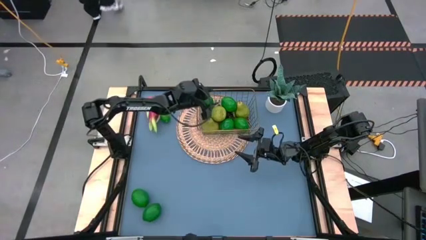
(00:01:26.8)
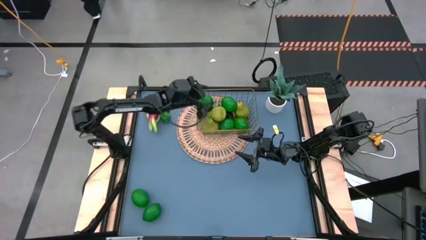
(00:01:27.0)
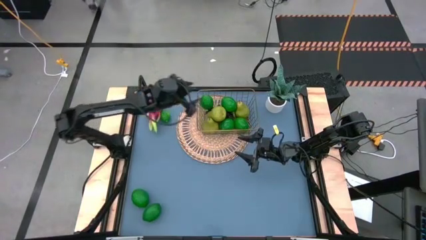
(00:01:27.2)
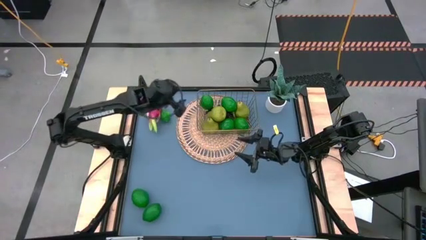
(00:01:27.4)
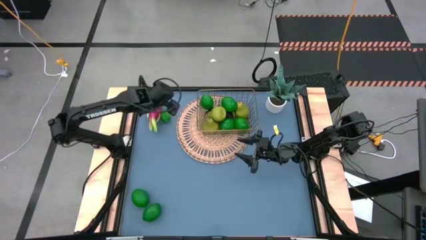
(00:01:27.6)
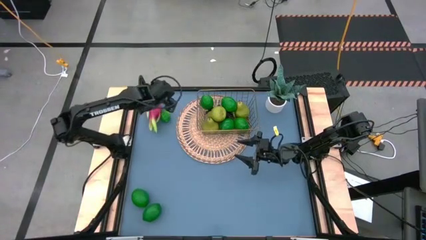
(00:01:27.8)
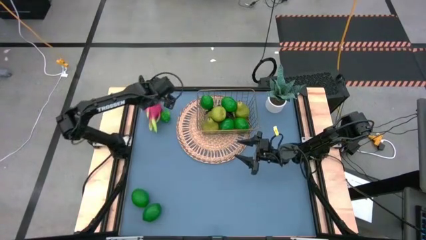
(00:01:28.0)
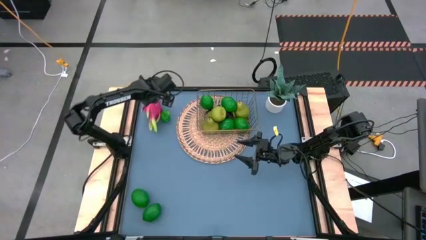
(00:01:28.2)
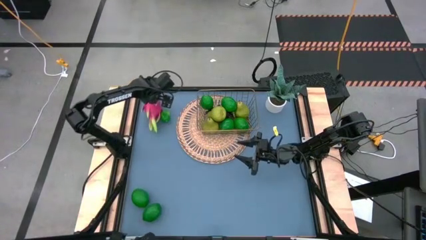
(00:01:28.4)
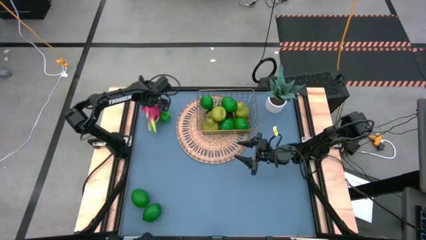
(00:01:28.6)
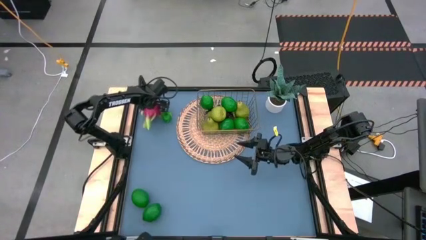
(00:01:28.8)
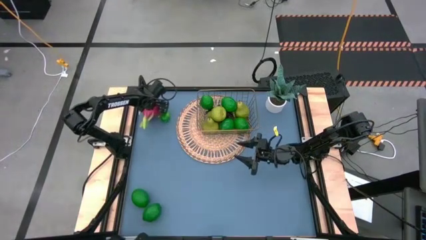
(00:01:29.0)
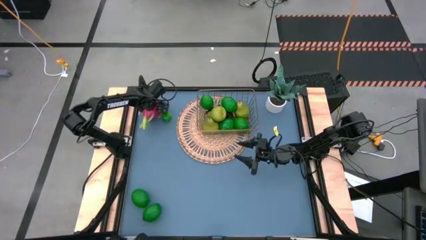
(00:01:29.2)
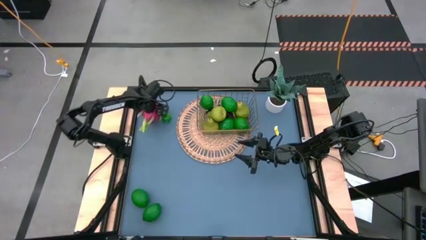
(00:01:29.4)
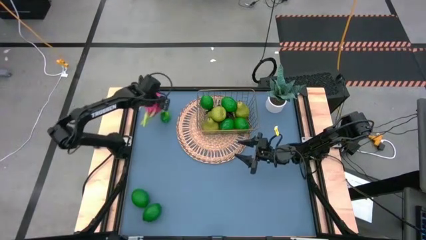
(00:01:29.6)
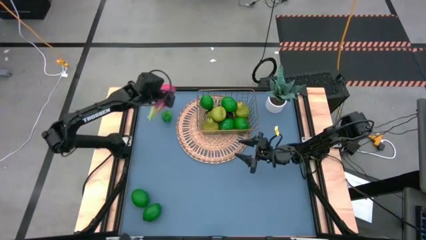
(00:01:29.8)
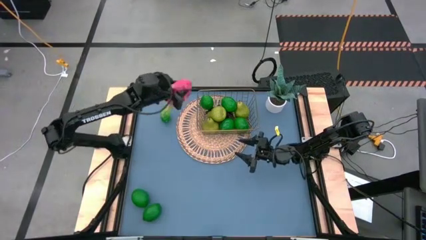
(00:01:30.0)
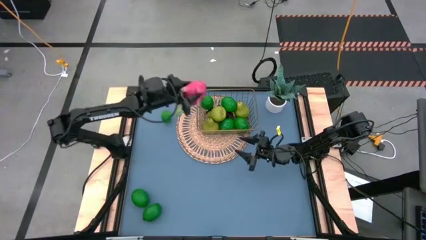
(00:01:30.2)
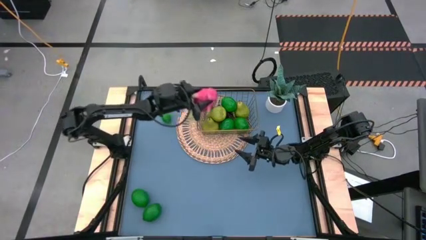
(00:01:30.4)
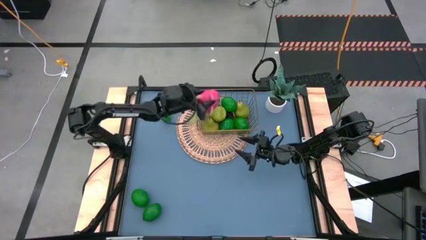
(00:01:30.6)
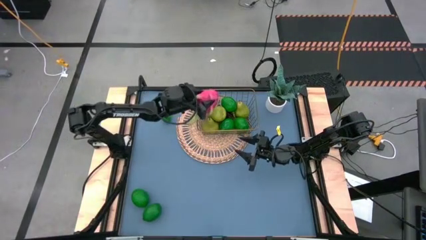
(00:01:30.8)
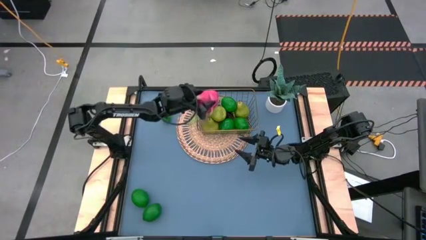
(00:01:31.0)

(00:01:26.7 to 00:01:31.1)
Task: Build produce basket
Put the pink dragon fruit into the wire basket

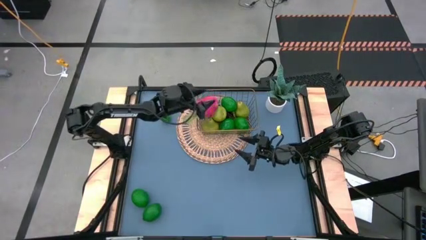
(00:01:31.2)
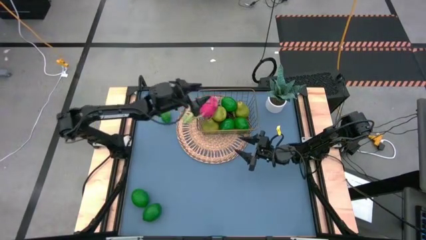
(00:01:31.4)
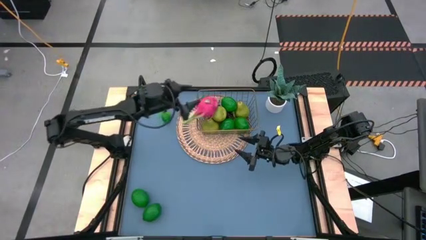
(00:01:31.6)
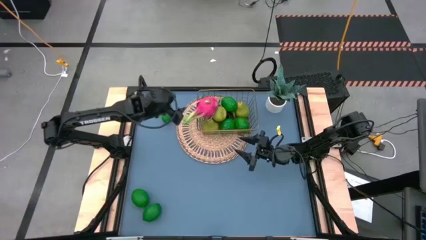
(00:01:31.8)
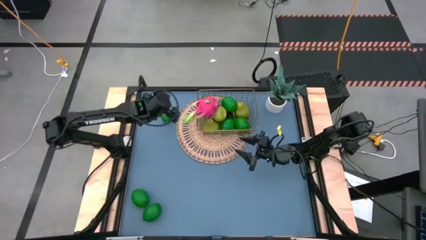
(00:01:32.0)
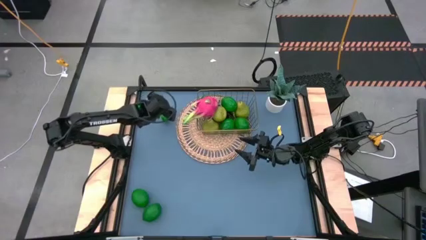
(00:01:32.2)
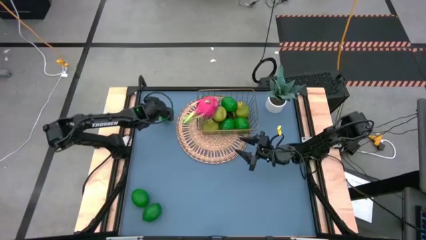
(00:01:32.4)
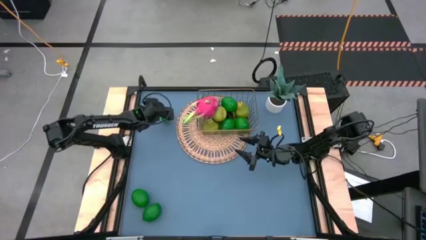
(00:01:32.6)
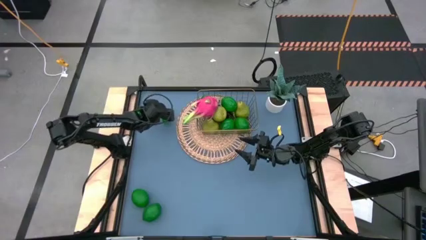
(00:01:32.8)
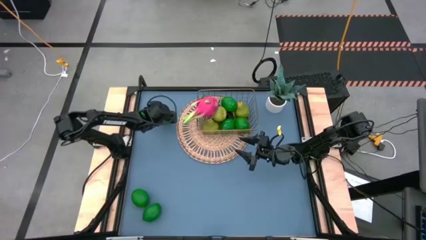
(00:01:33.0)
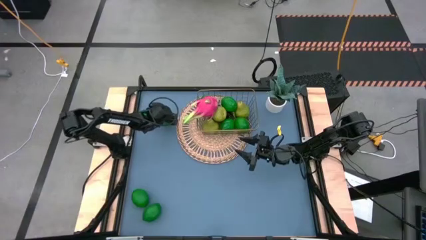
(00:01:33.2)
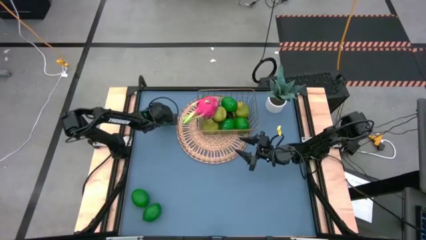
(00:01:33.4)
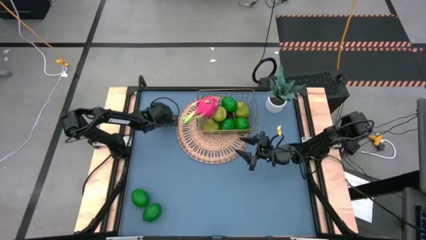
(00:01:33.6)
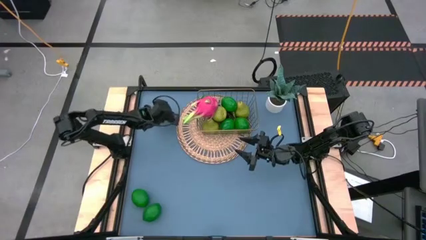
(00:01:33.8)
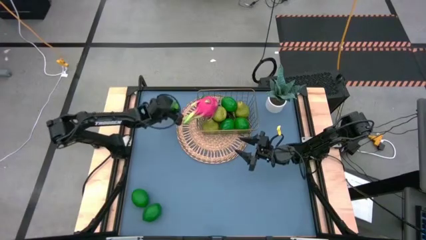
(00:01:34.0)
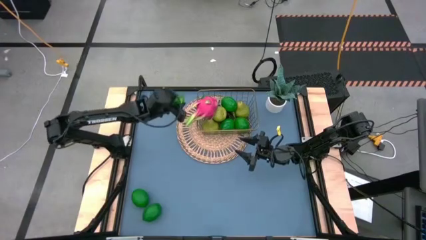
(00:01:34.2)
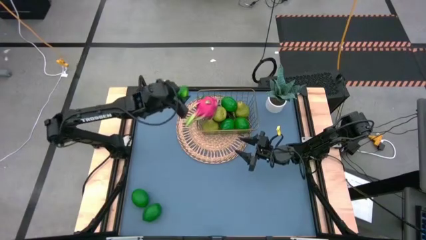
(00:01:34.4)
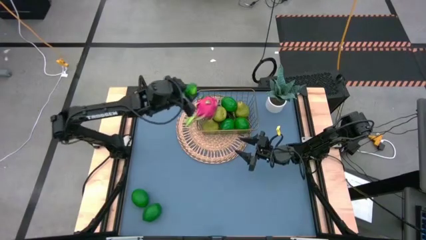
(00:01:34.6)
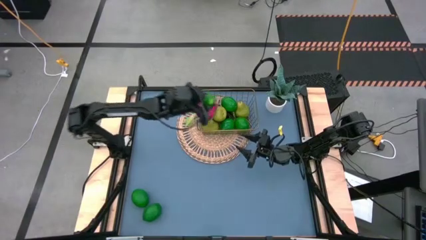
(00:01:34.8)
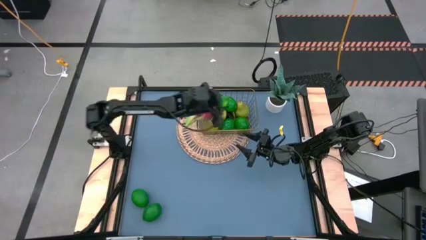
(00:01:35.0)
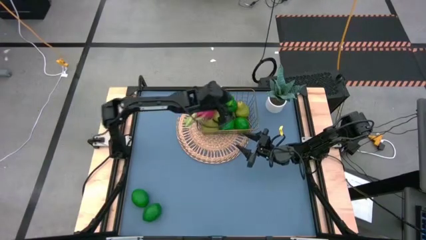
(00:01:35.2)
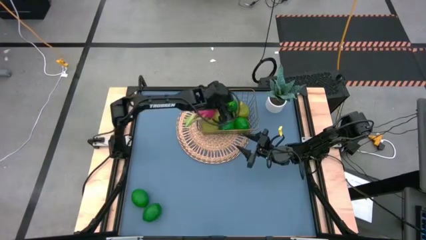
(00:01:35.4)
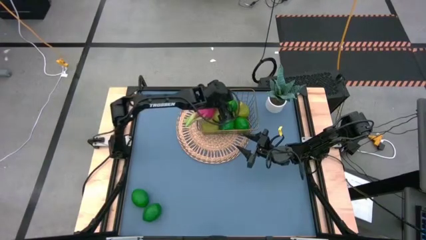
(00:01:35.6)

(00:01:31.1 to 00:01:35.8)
Put the green lime into the wire basket

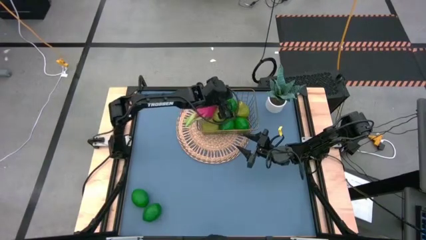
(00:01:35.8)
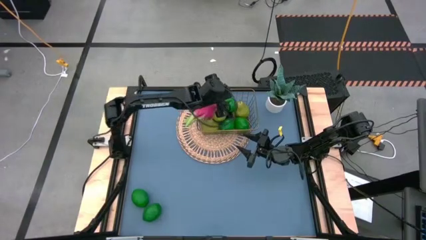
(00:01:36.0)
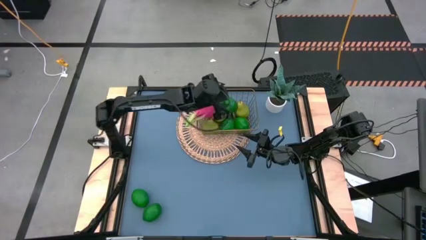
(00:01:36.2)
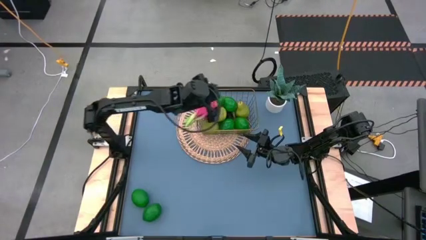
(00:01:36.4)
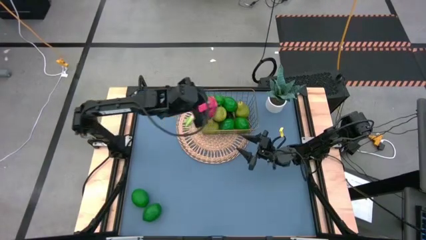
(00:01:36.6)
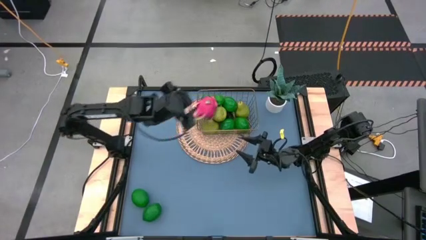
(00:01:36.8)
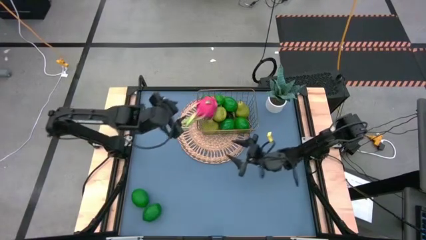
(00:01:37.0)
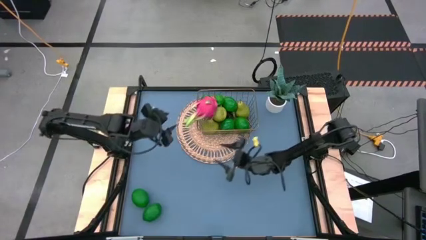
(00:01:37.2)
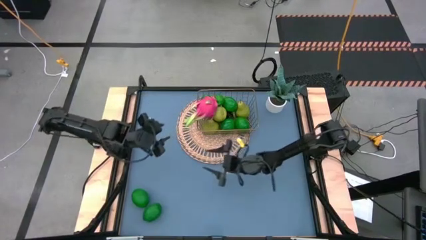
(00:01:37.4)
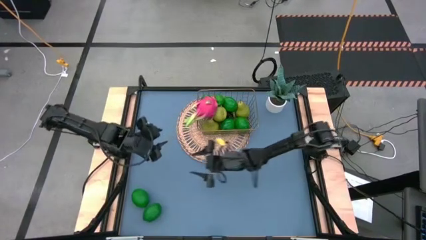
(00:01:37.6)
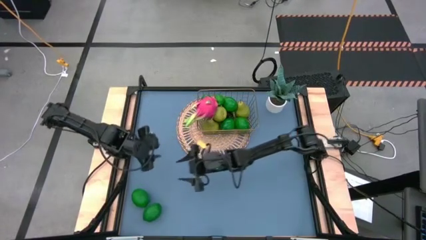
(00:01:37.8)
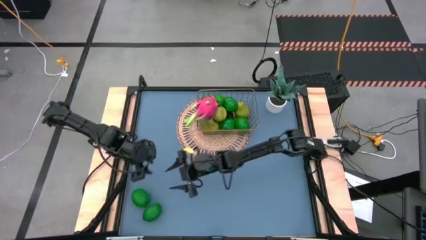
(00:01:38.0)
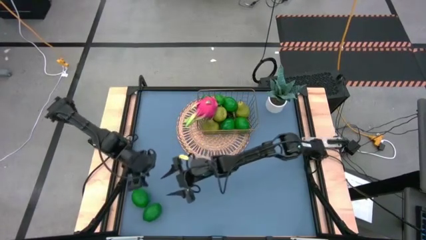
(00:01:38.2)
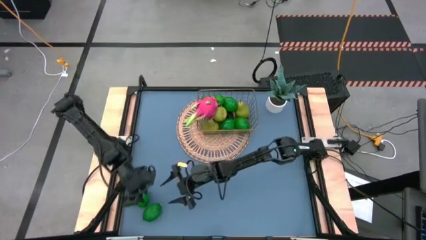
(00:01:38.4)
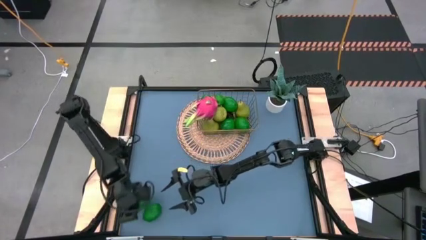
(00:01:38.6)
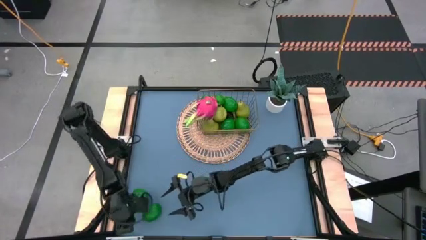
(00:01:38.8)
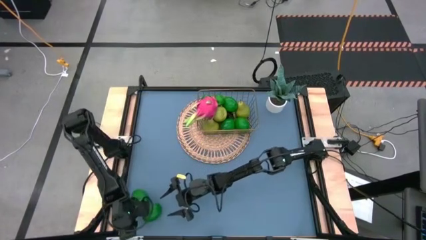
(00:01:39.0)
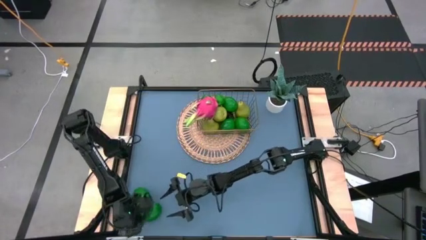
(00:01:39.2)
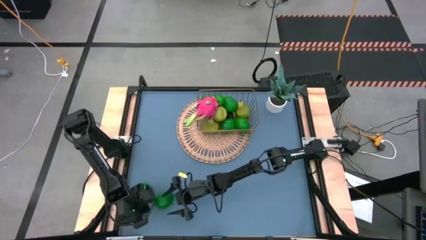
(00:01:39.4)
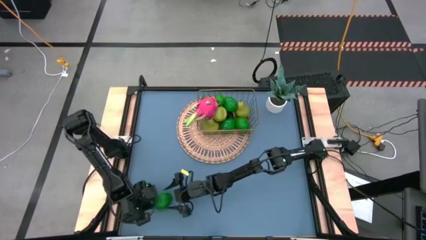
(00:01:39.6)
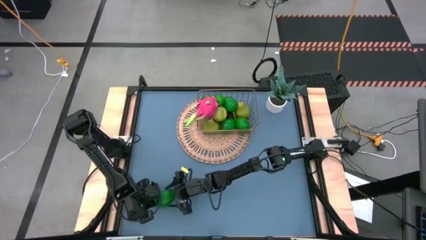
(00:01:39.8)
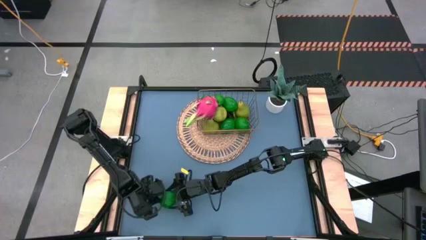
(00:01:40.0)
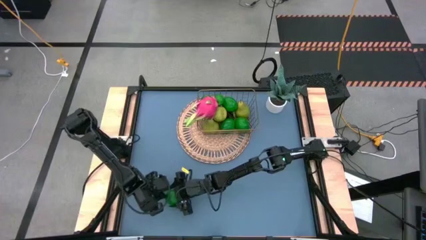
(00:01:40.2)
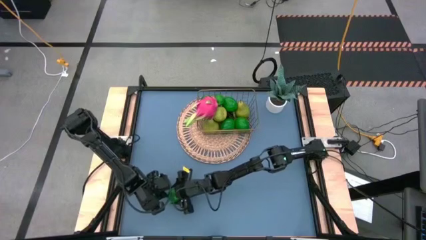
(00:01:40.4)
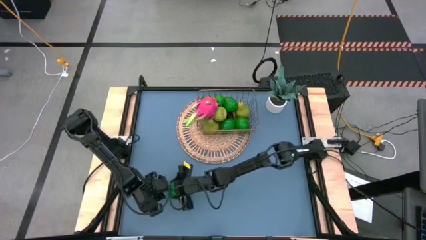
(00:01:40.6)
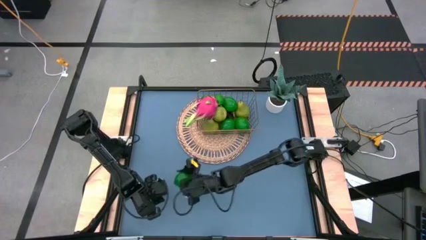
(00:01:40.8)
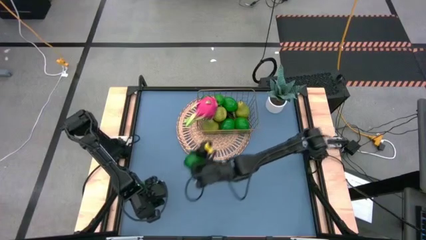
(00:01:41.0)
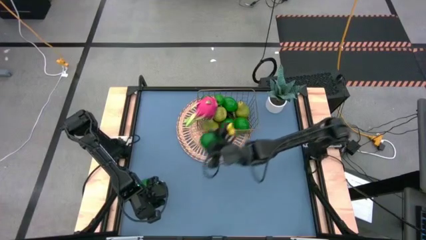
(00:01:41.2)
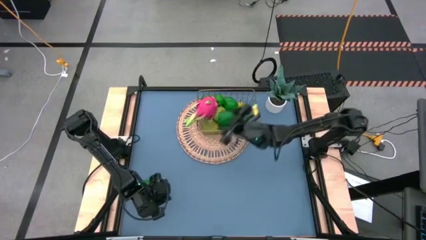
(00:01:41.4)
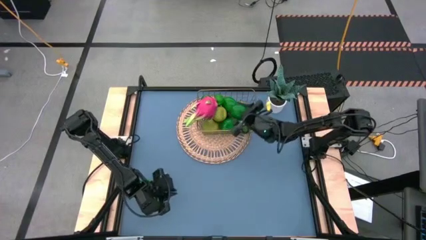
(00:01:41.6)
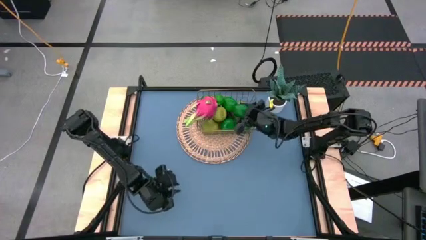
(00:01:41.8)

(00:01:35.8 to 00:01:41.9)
Put the green lime into the wire basket
